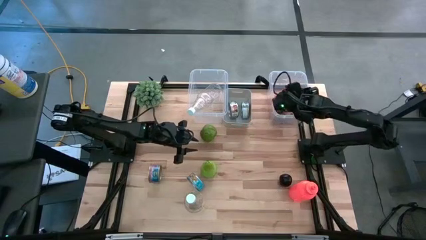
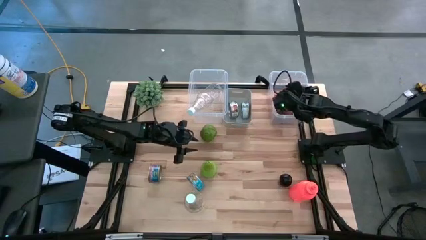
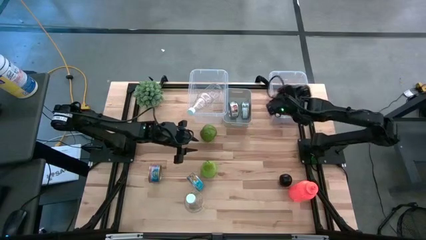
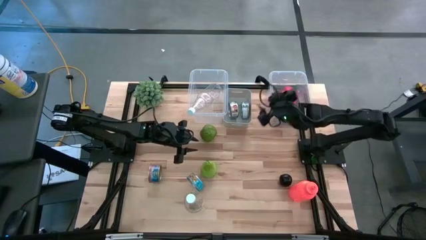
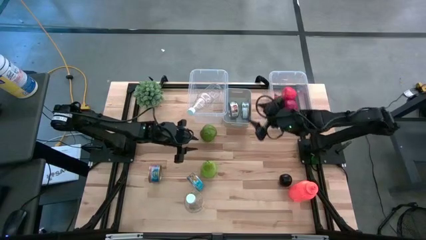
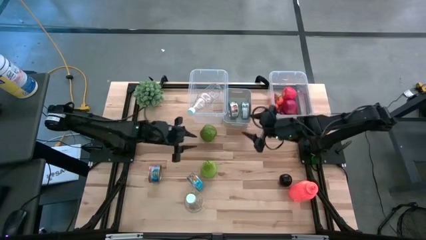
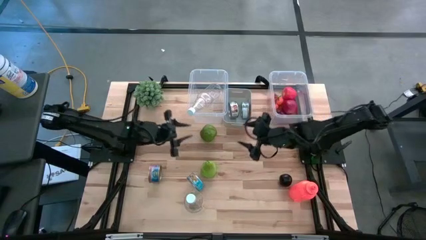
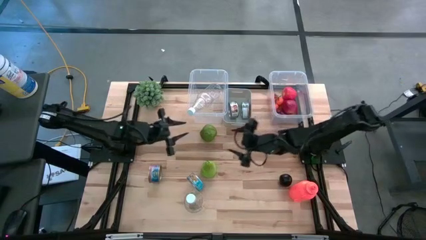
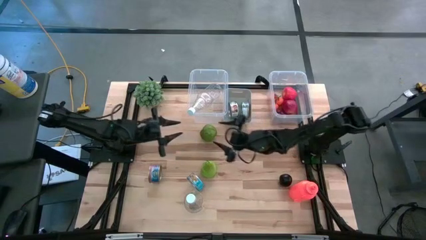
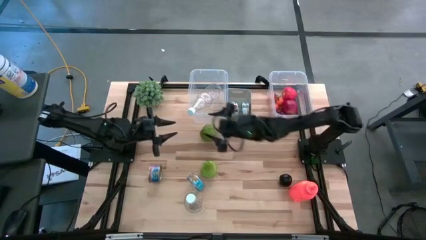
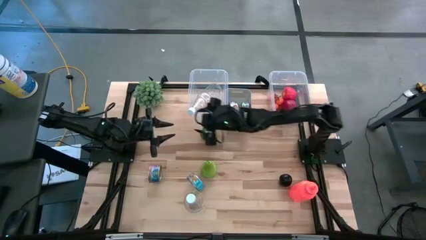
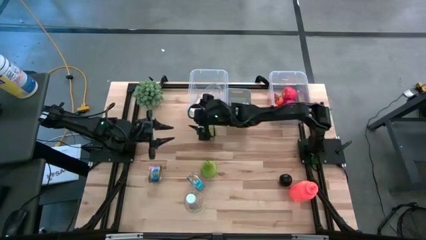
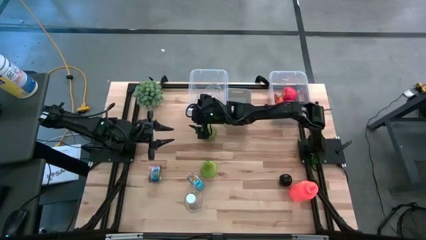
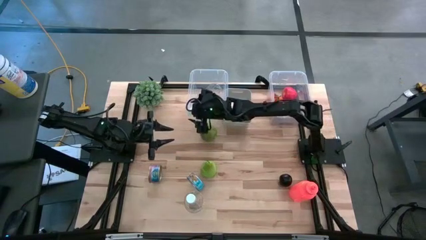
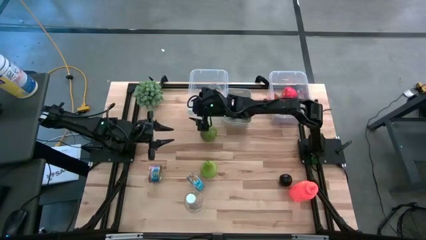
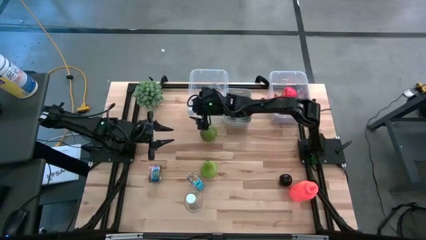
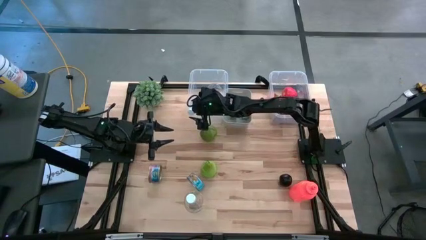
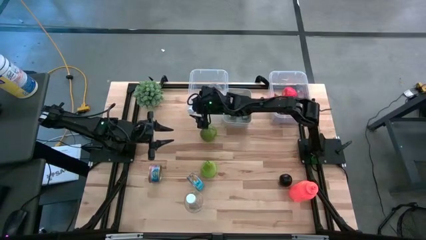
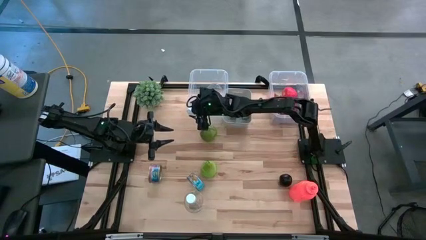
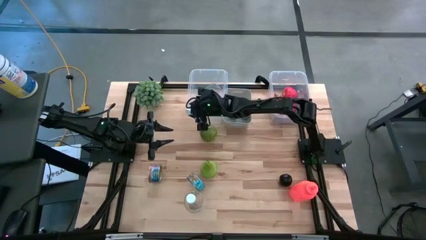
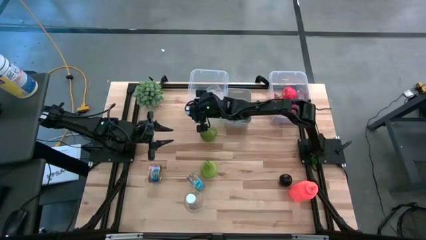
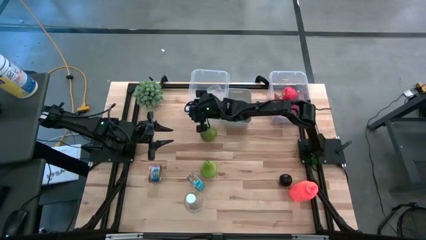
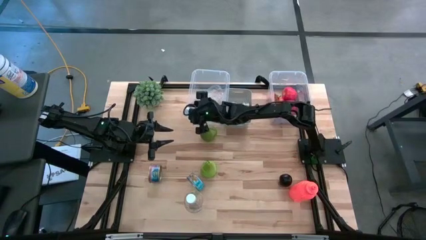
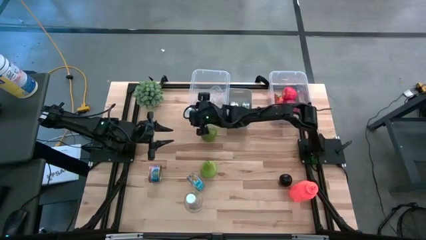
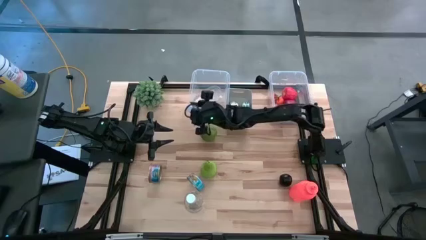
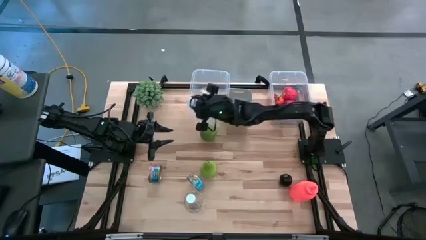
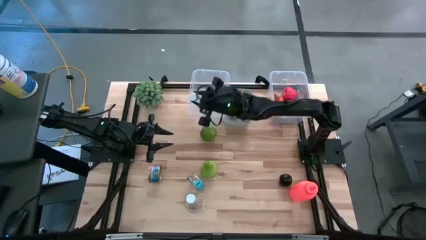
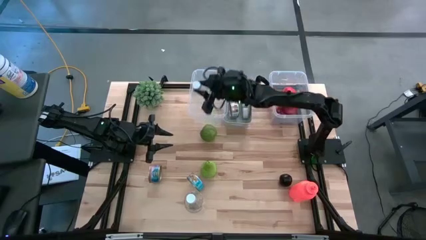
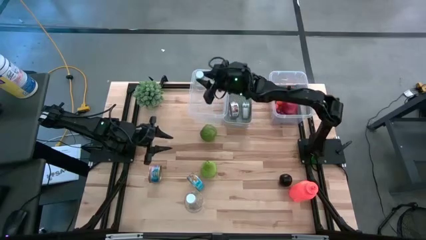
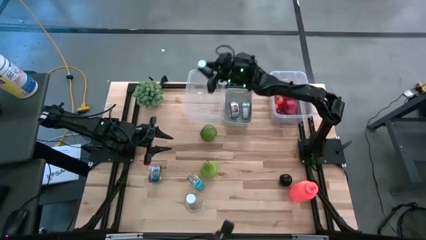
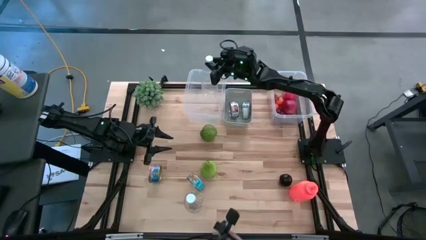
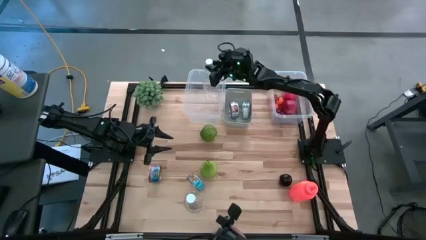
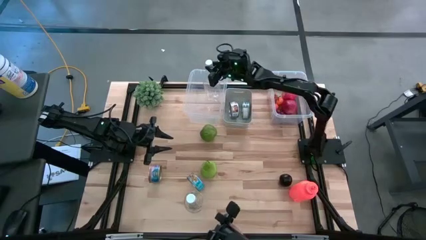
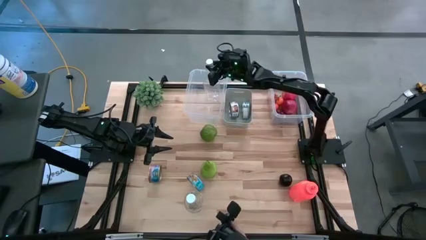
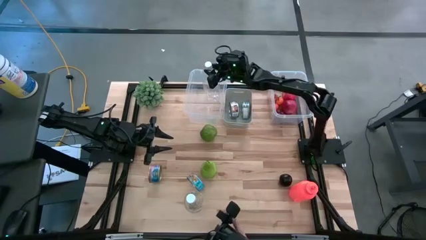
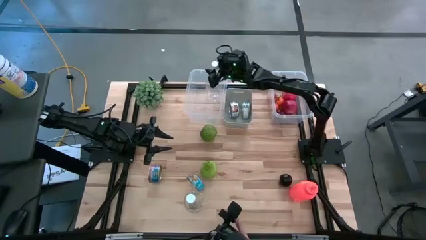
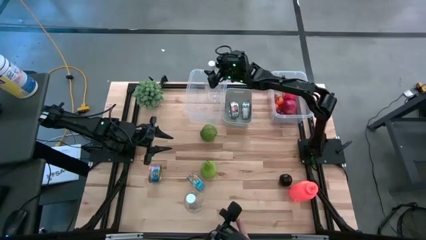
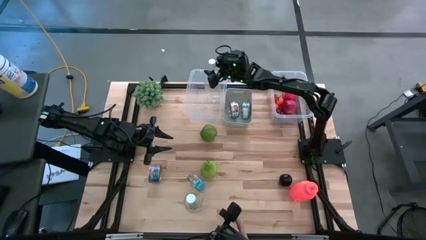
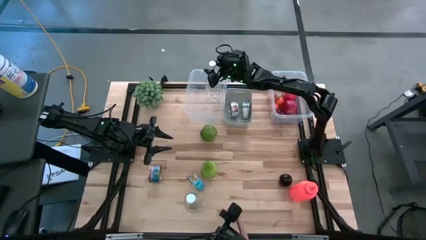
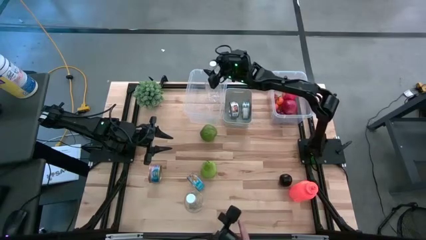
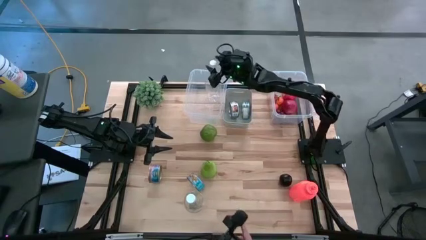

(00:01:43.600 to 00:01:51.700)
Task: Pick & Place Food Item
Put the transparent bottle into the left transparent bin upright

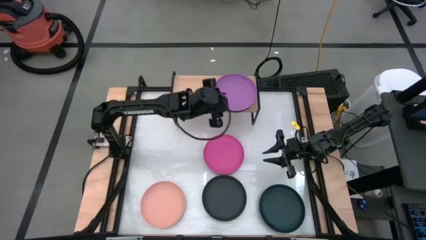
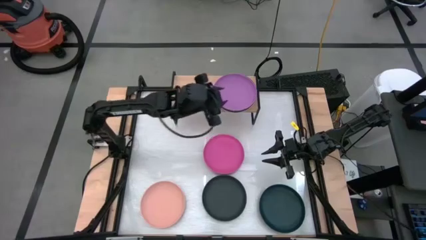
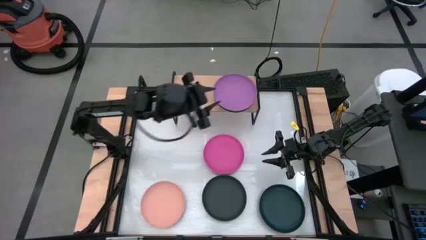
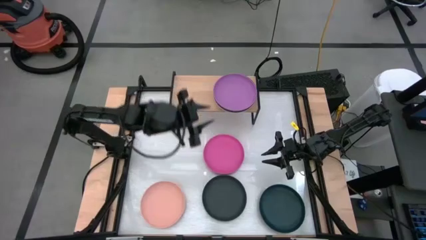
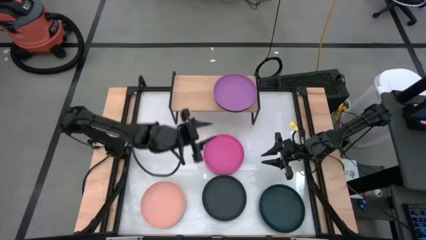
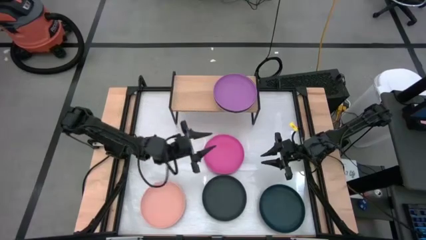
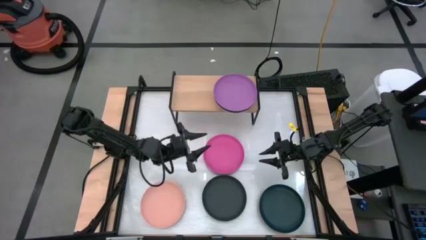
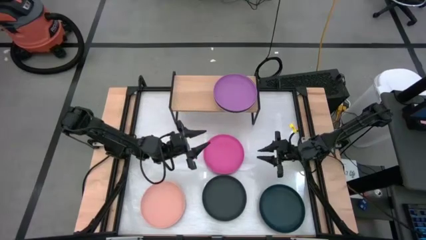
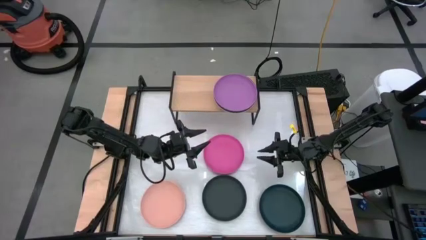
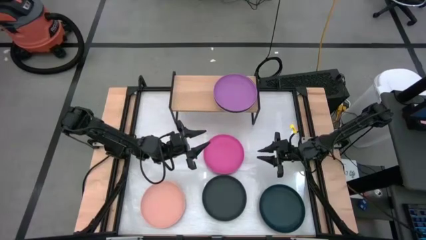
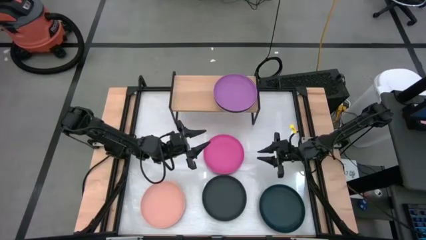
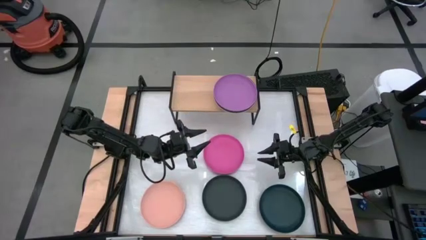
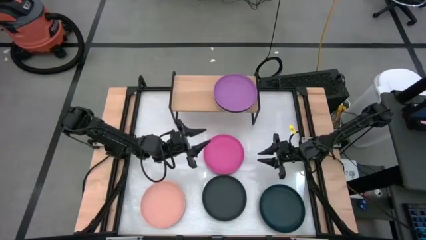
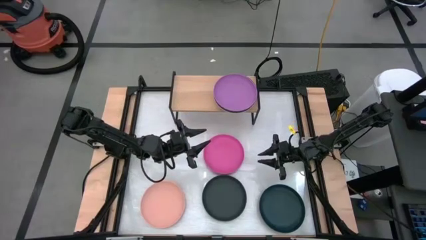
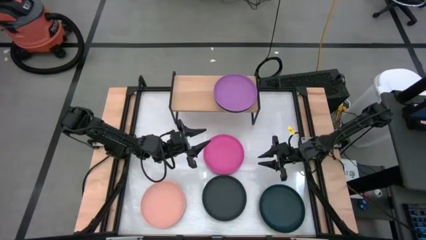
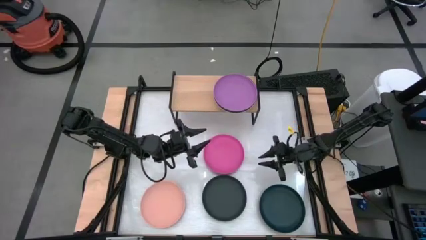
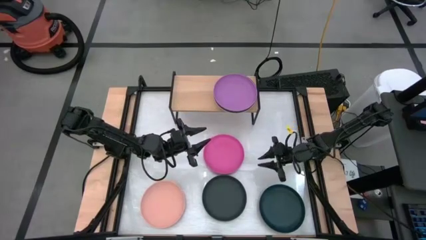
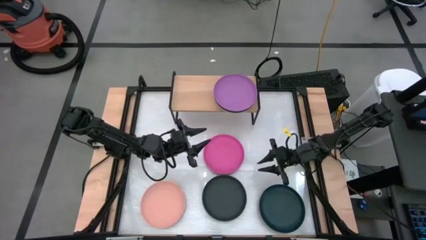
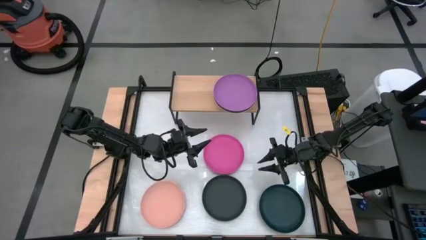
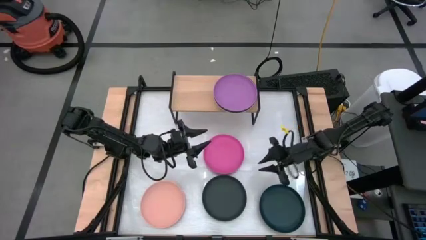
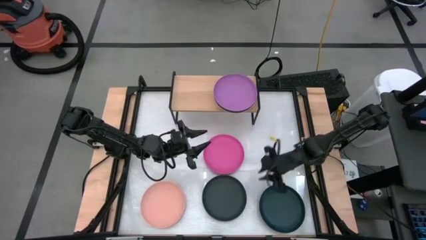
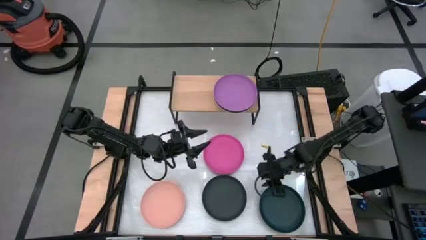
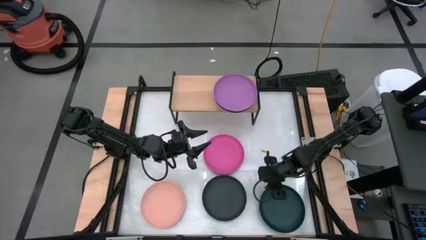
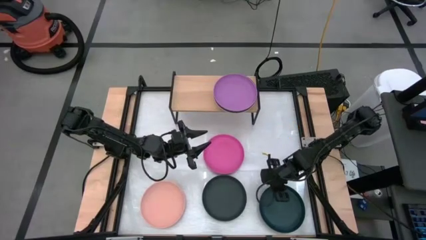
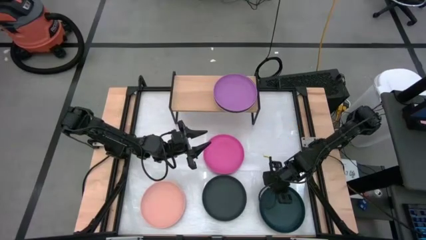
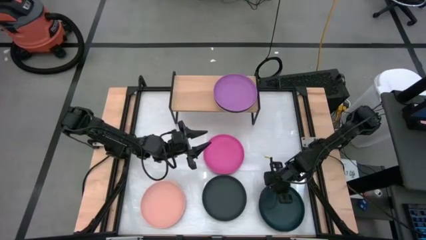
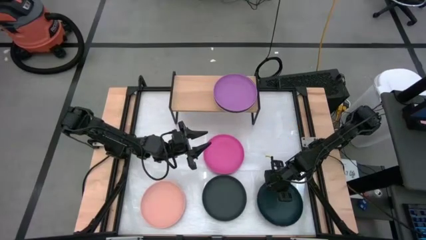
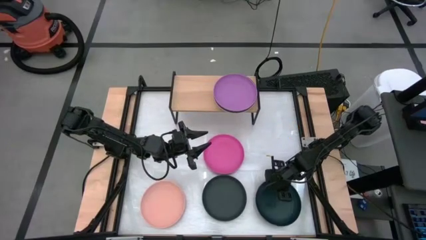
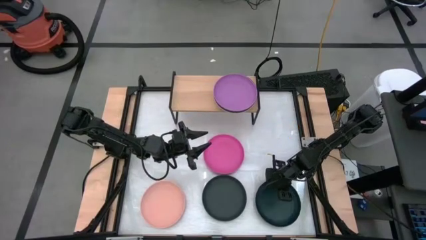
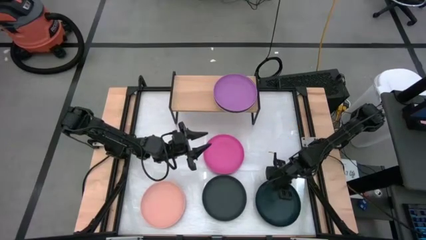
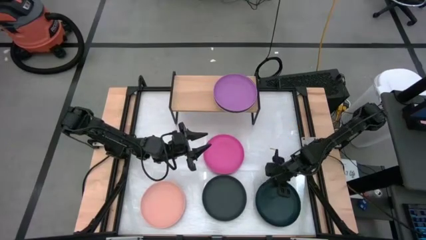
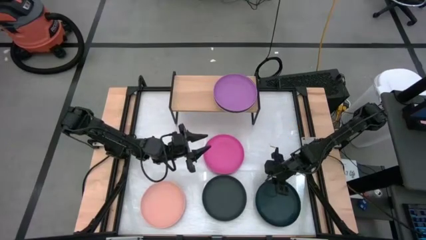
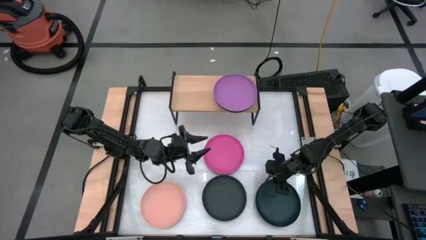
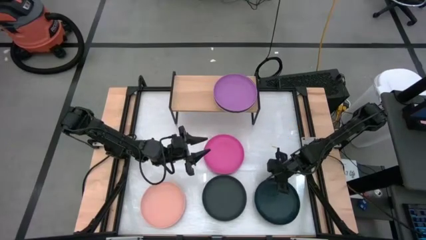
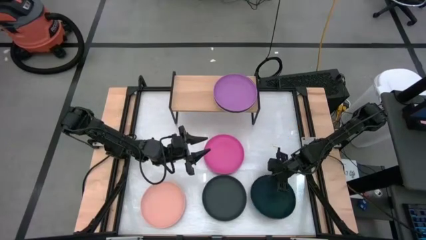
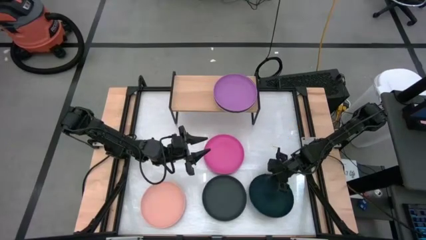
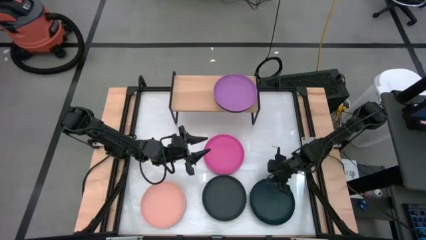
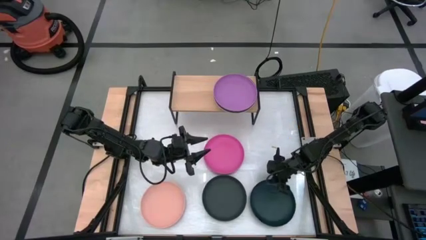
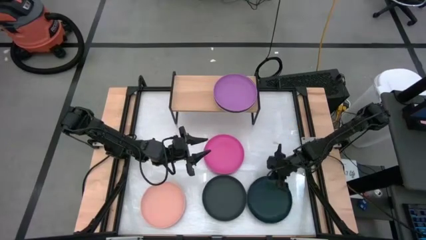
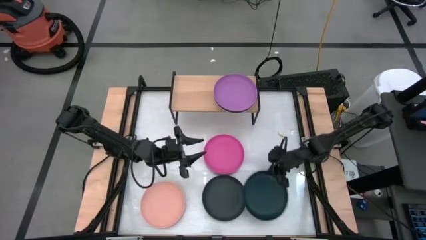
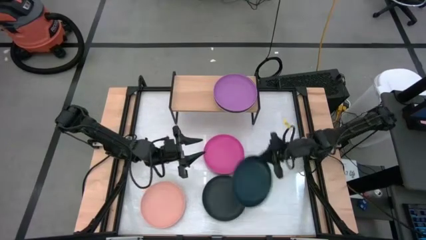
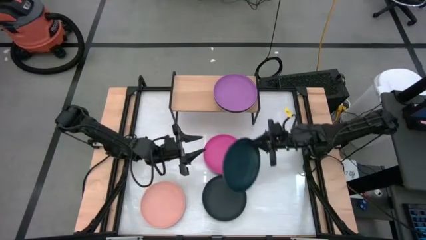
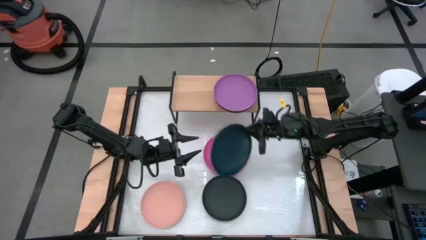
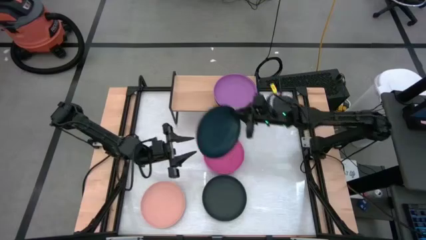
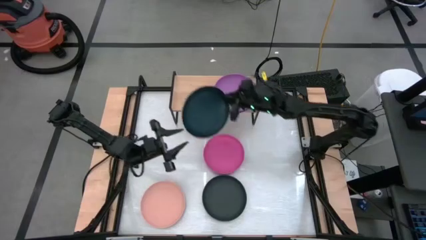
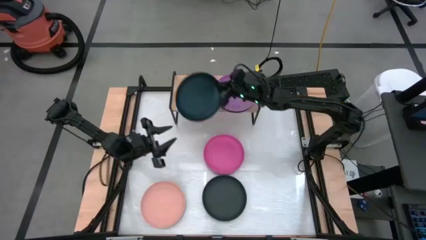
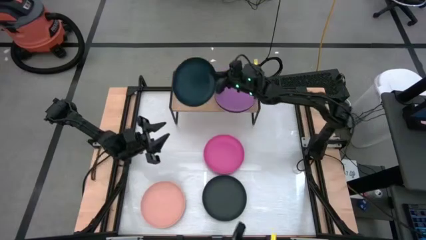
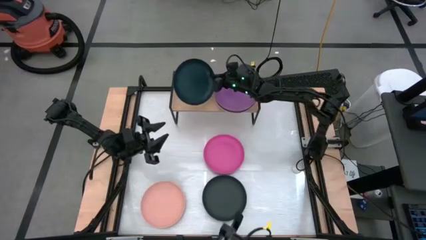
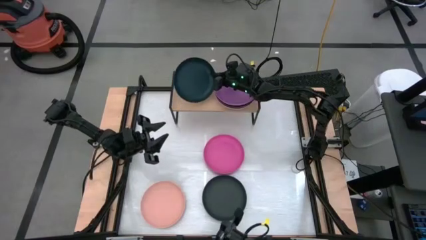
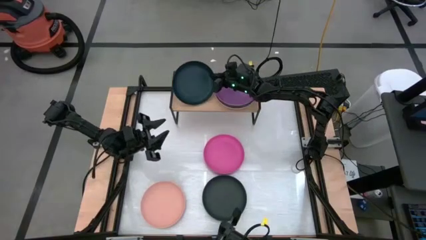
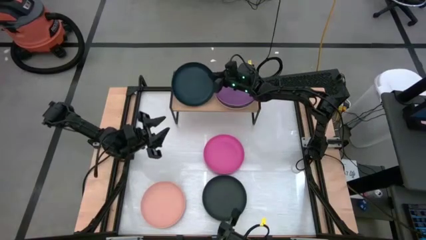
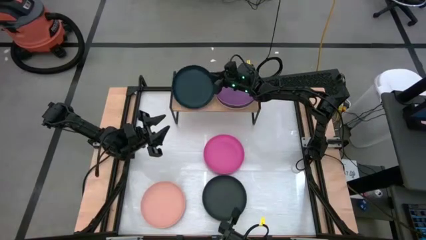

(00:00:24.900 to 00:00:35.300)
Task: Place and stack plates onto a shelf
Put the dark green plate on the shelf
